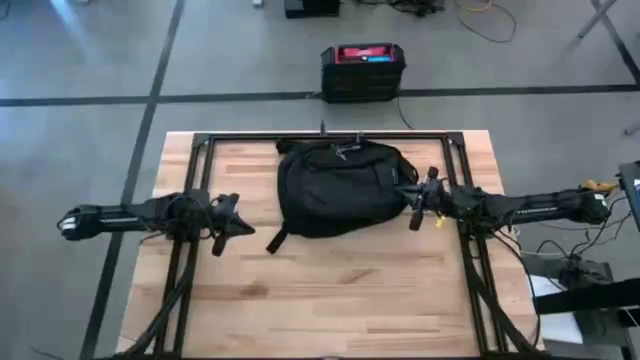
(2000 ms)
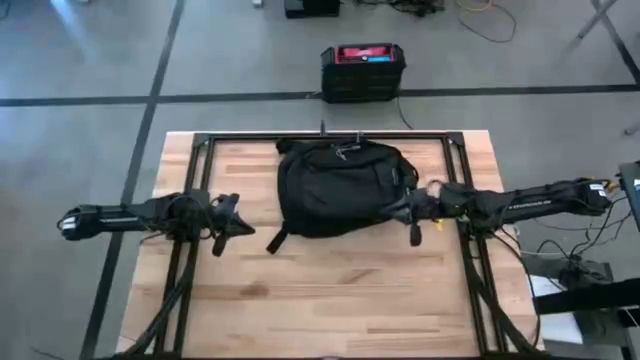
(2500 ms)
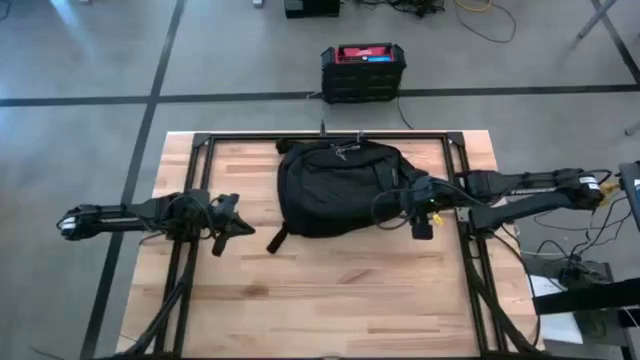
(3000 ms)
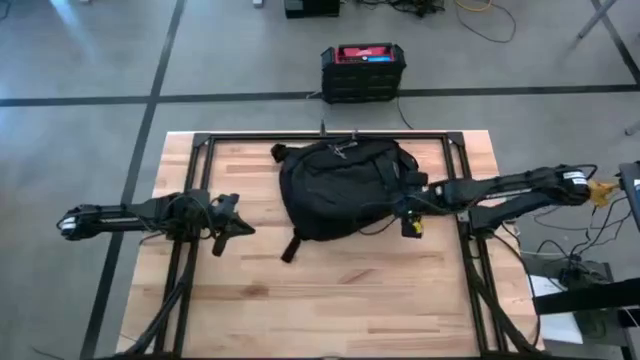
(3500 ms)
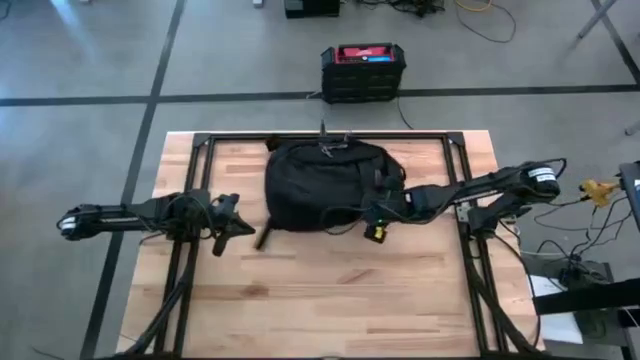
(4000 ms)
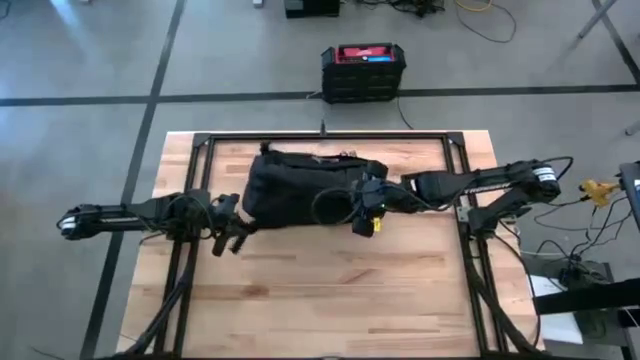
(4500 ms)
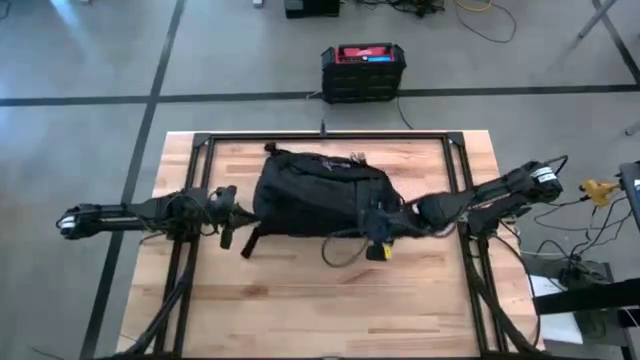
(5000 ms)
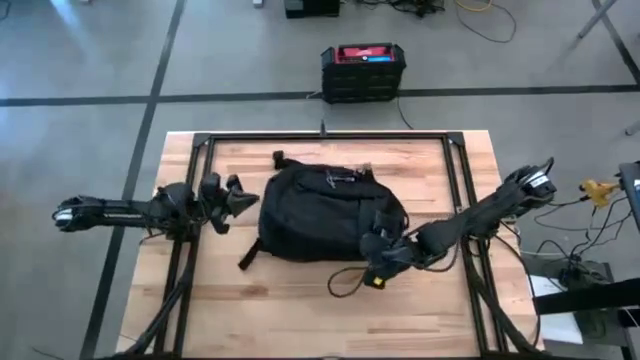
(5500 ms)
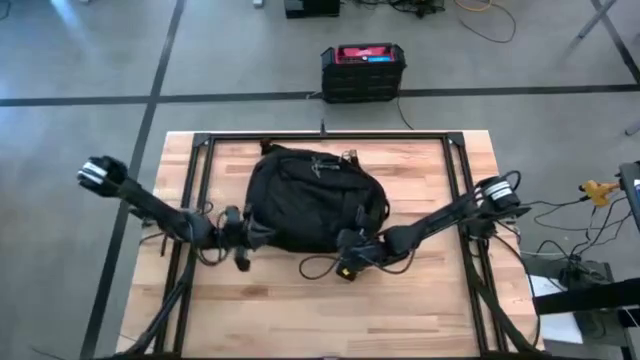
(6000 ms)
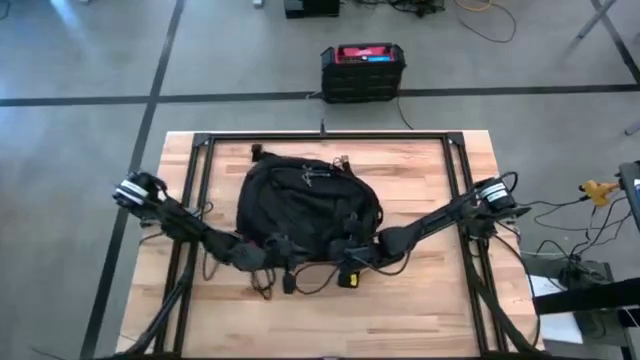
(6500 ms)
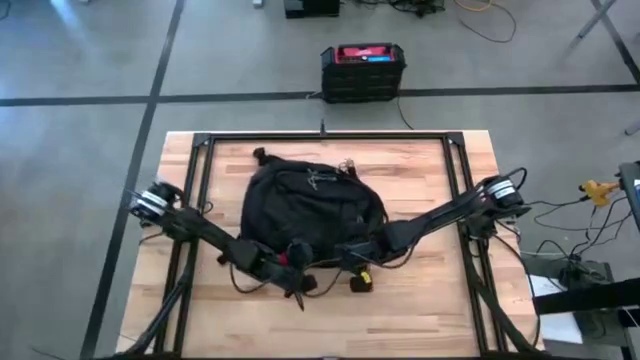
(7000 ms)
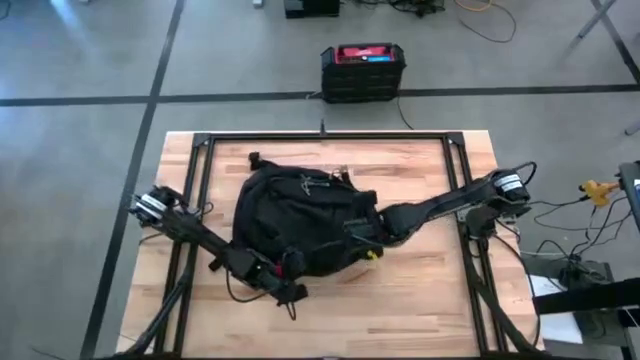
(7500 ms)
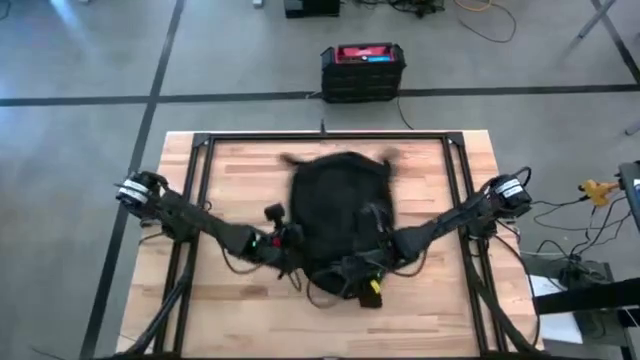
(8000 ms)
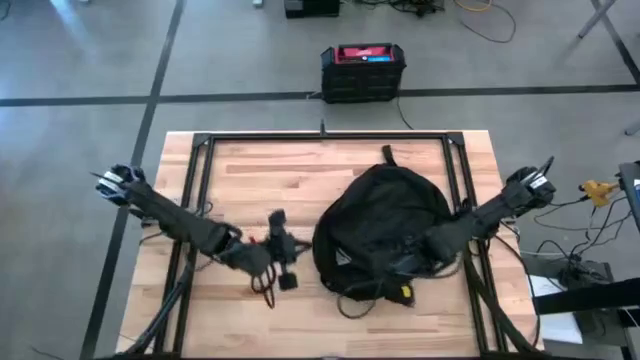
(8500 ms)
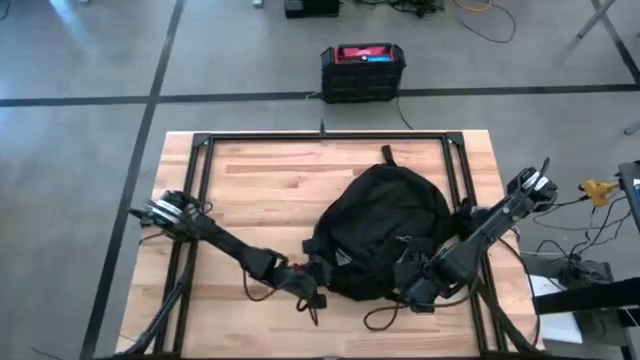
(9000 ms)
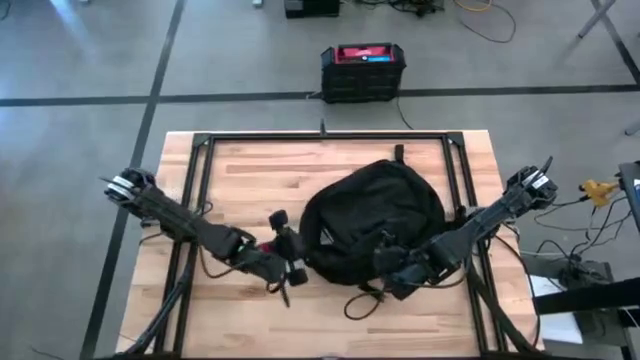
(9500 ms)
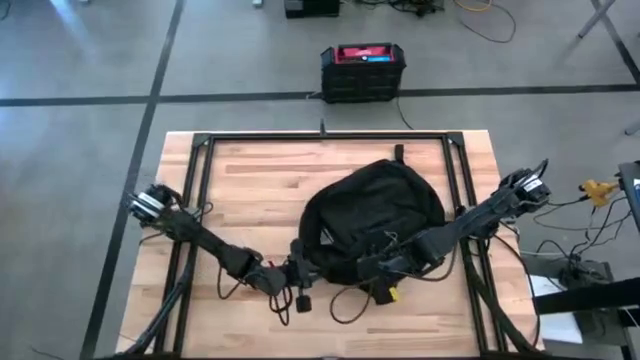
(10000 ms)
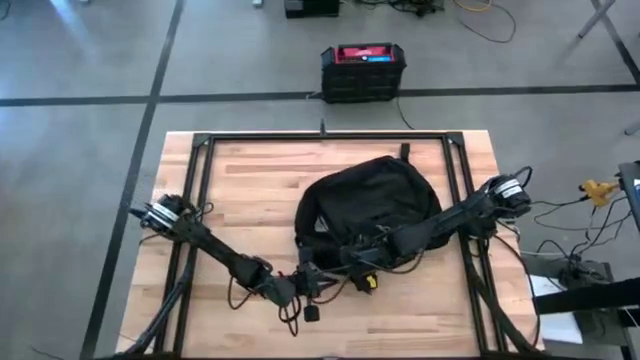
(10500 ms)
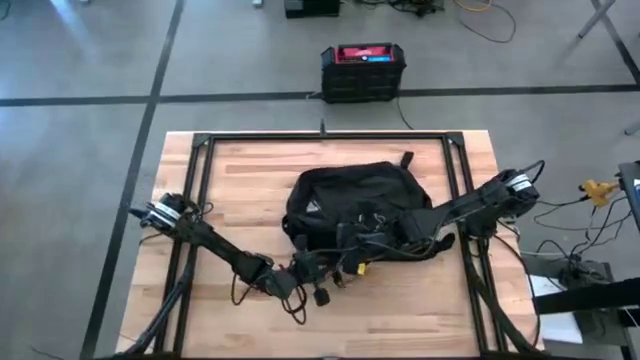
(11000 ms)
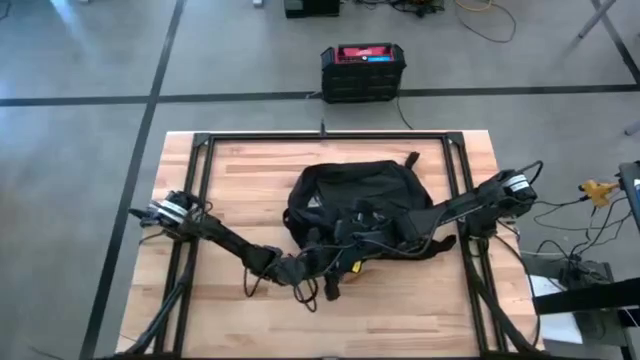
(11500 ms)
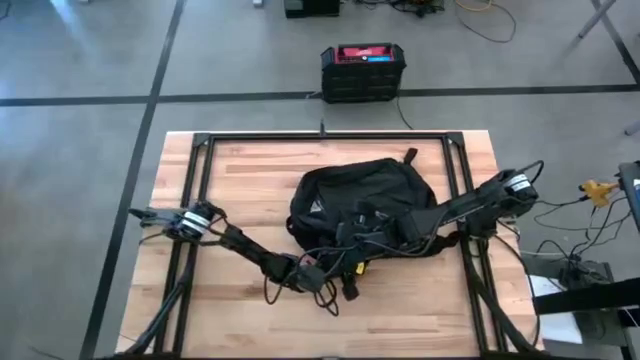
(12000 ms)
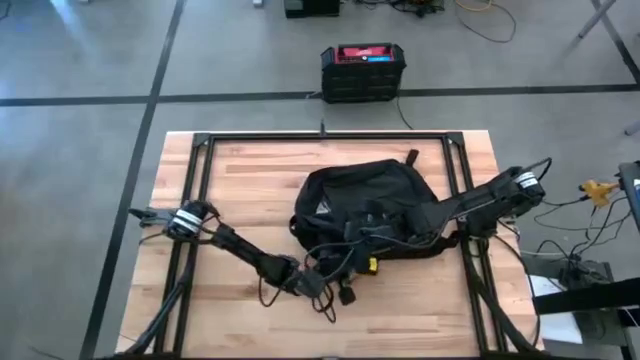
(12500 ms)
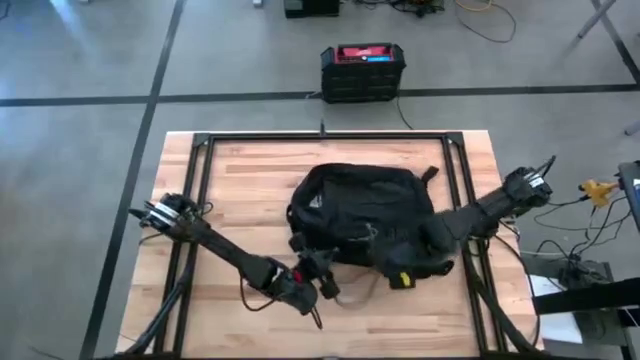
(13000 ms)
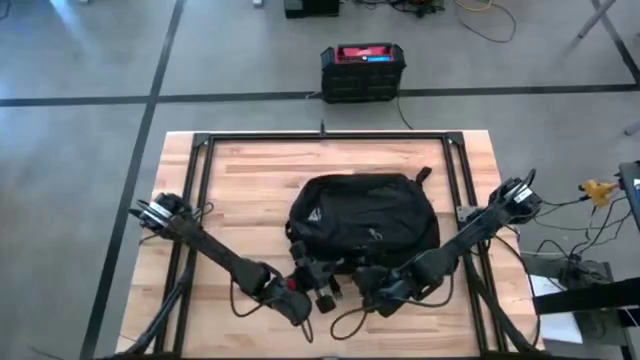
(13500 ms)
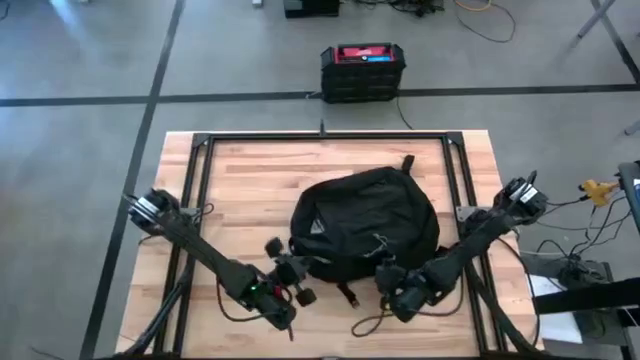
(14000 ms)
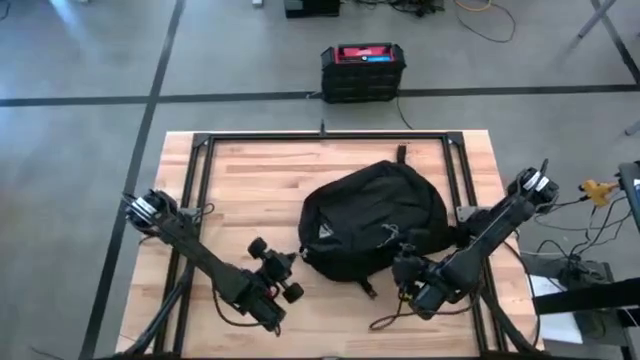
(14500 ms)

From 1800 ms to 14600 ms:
Task: Unpack backpack
Open the black backpack

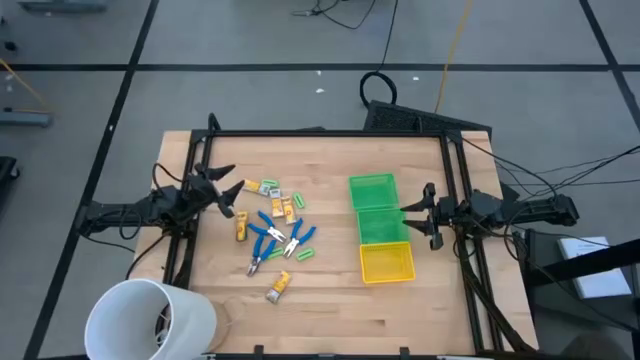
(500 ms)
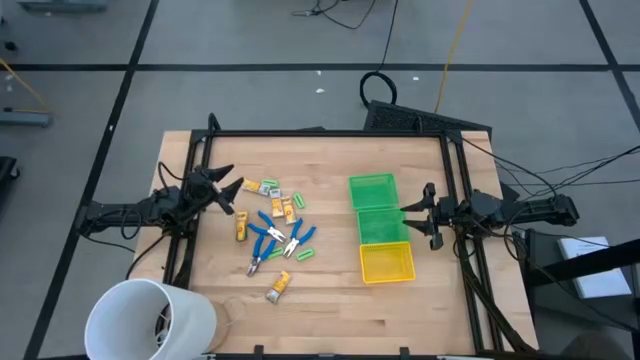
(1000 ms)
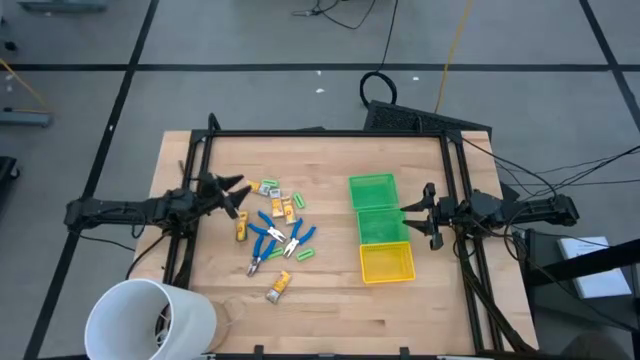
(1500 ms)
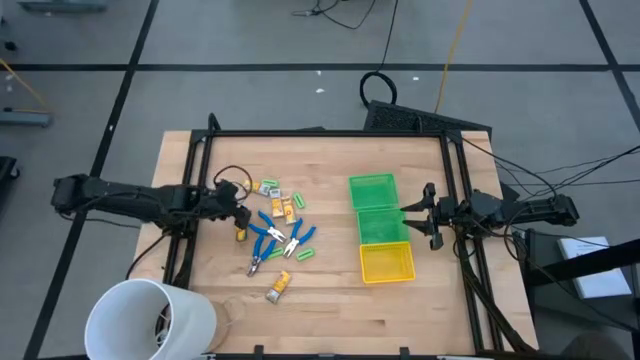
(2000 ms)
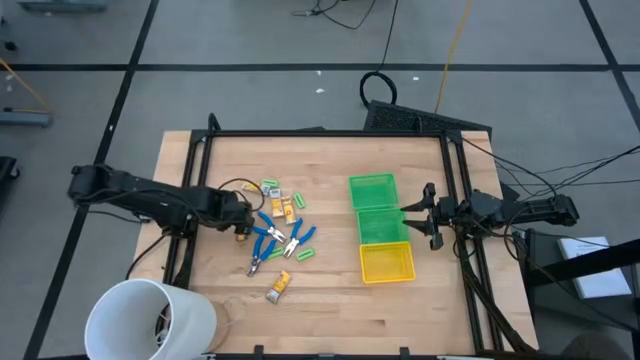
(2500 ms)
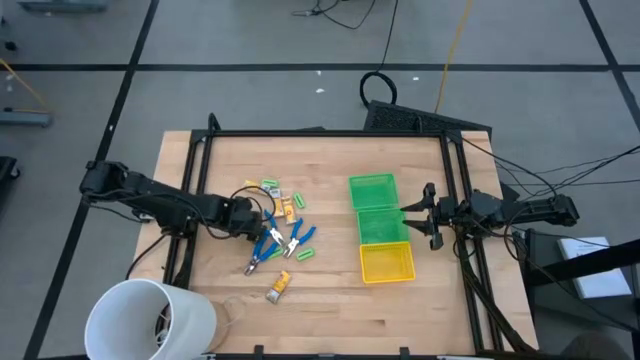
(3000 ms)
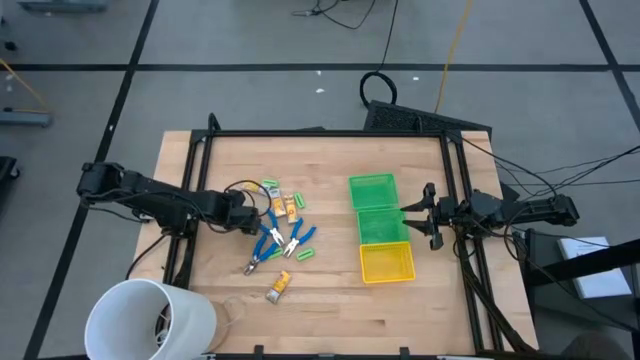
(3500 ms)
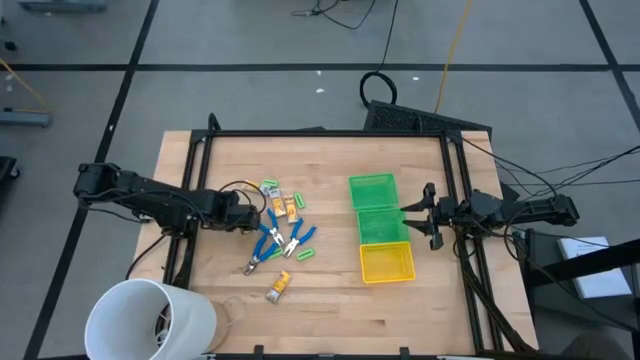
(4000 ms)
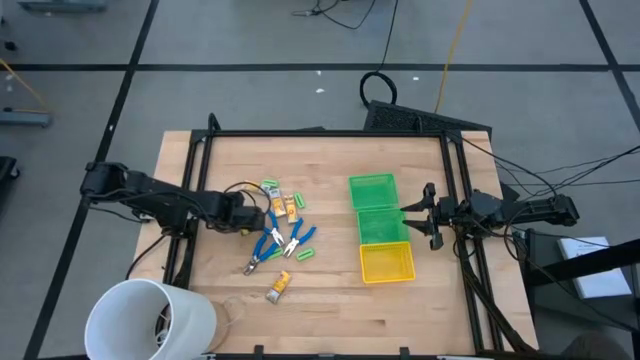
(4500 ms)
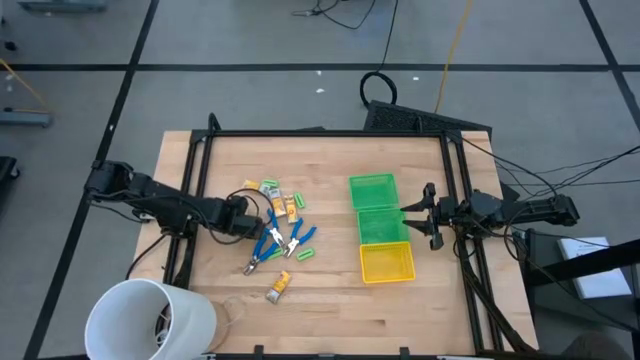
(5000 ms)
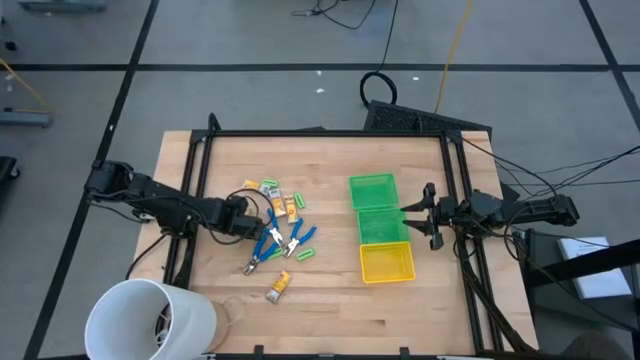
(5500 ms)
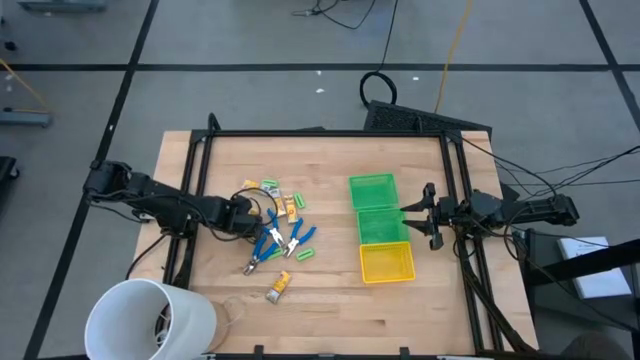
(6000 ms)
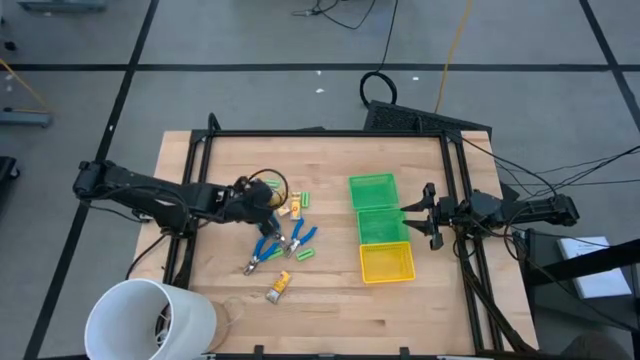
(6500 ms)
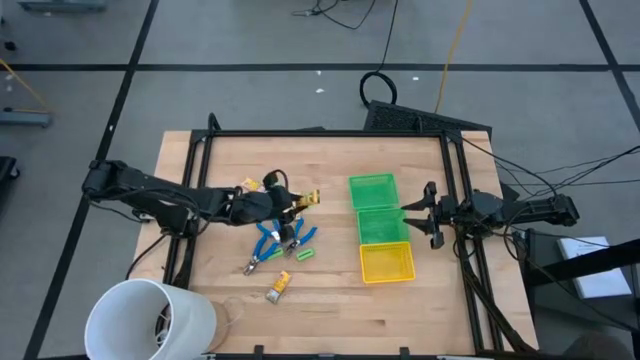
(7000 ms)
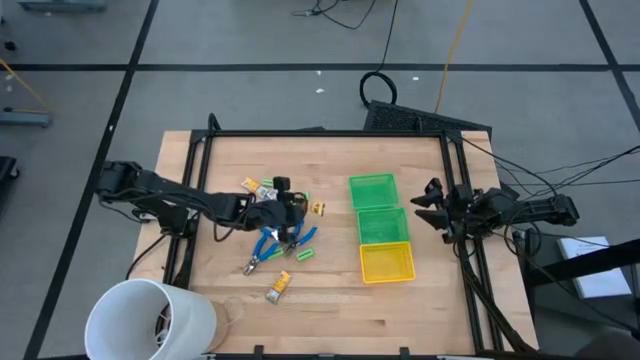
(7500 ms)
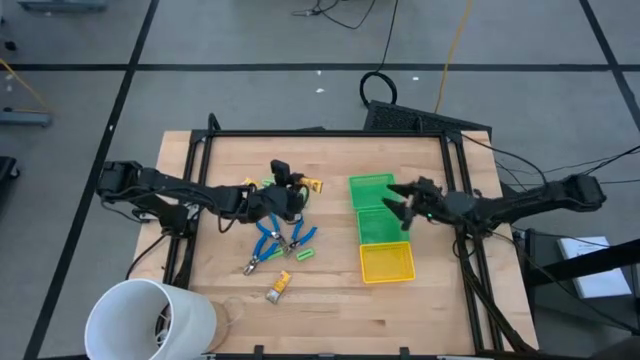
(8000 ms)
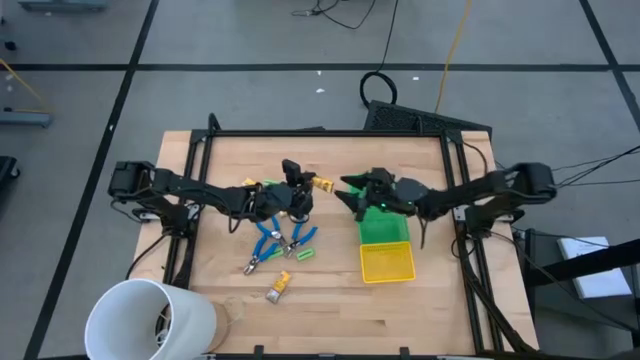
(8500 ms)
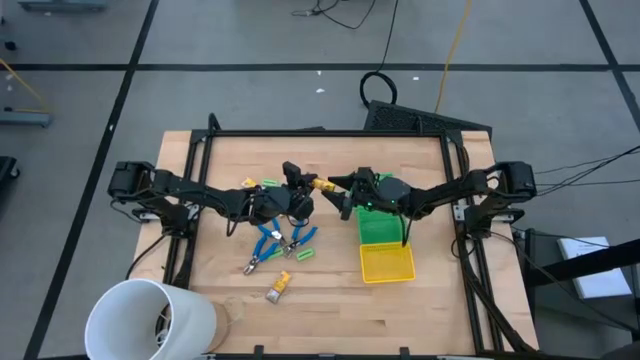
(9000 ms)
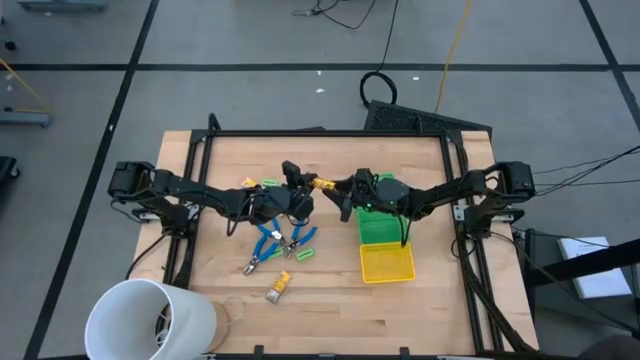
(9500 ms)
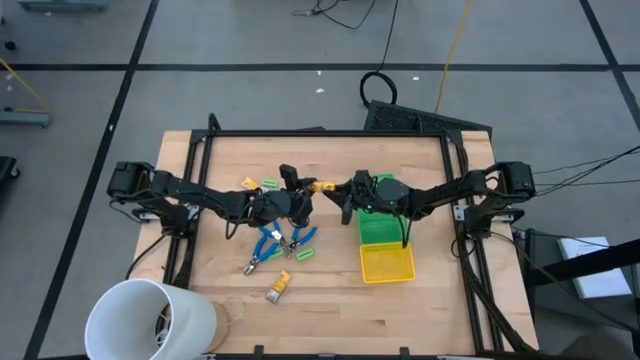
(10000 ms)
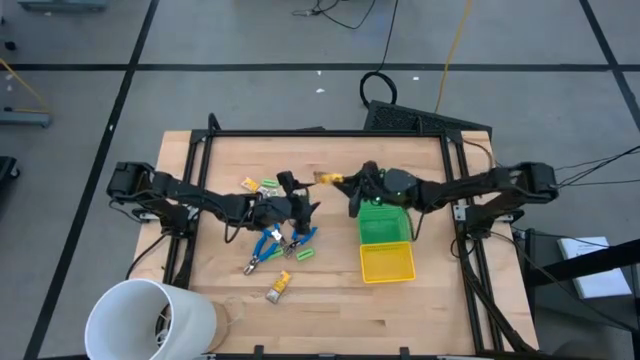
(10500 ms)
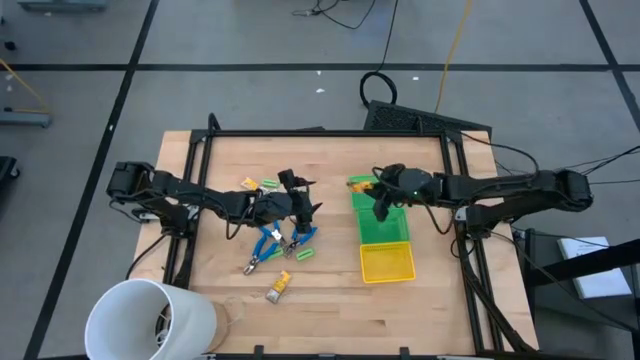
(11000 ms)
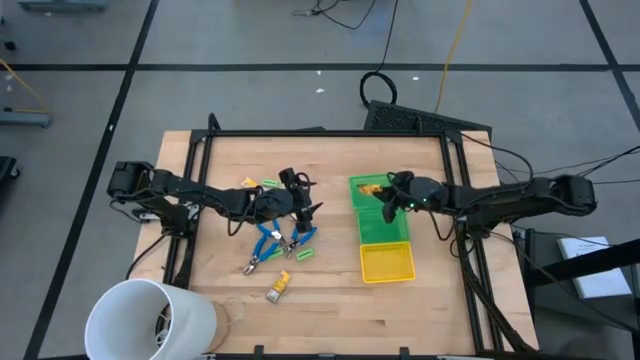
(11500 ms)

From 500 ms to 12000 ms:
Task: Pick & Place School Supplies
Put the yellow crayon box into the top green bin
